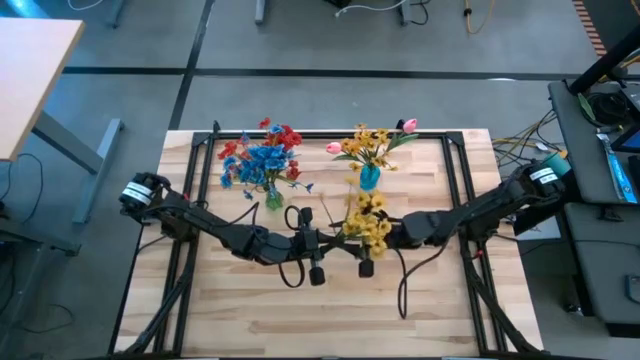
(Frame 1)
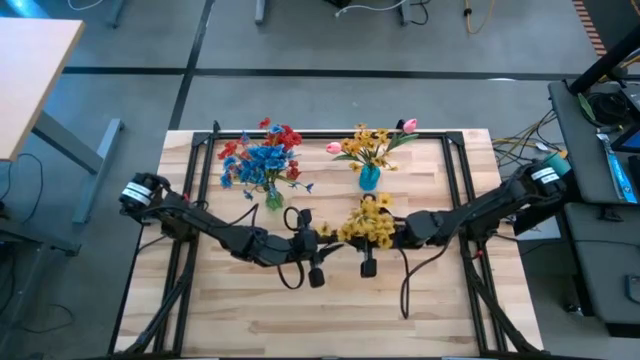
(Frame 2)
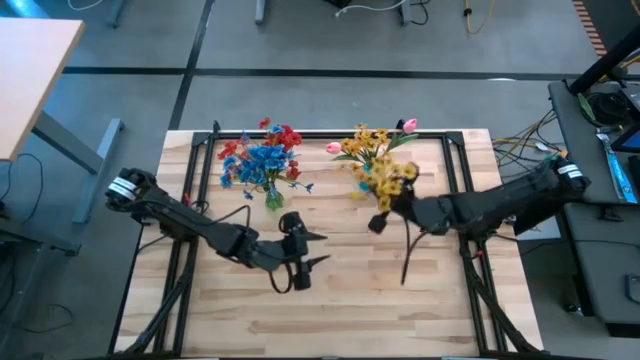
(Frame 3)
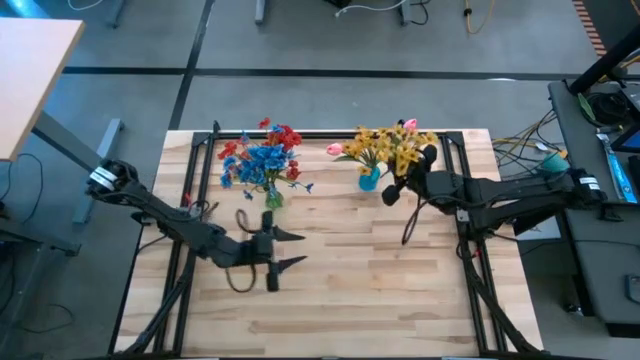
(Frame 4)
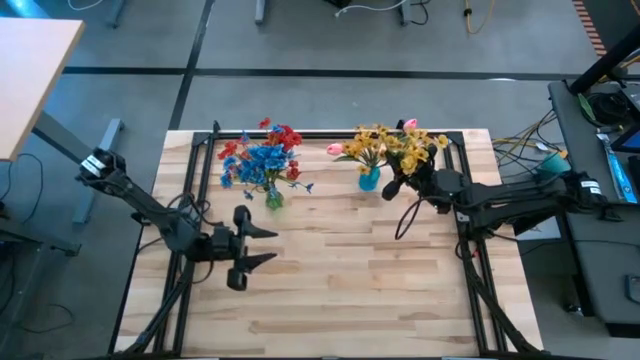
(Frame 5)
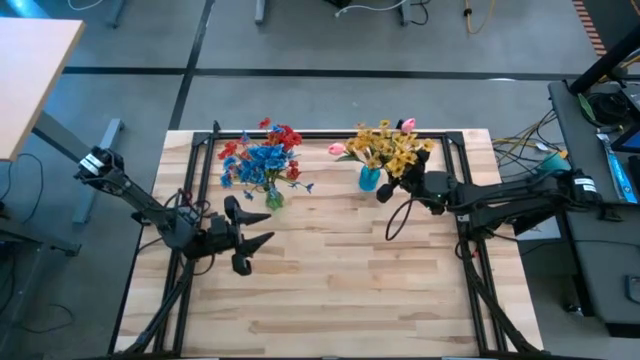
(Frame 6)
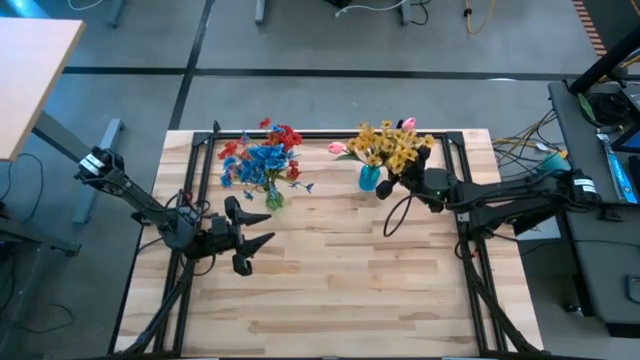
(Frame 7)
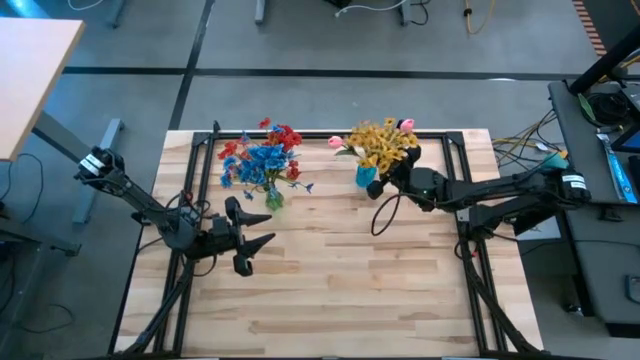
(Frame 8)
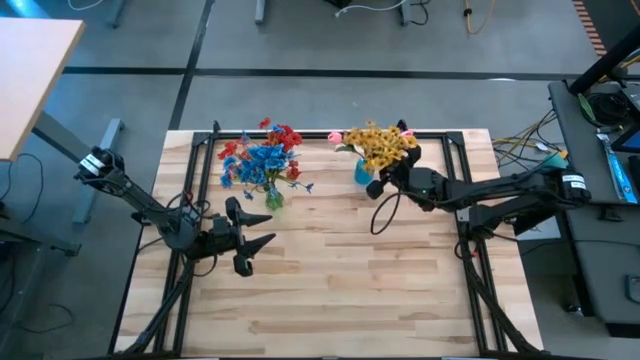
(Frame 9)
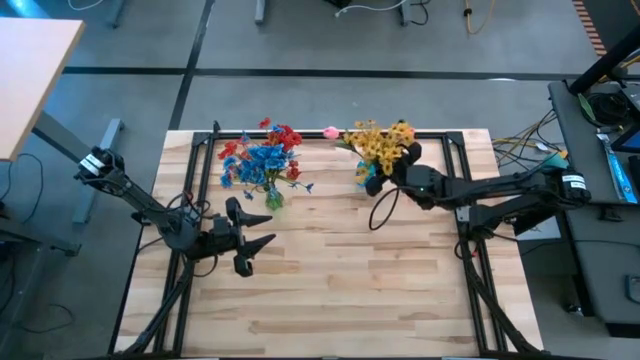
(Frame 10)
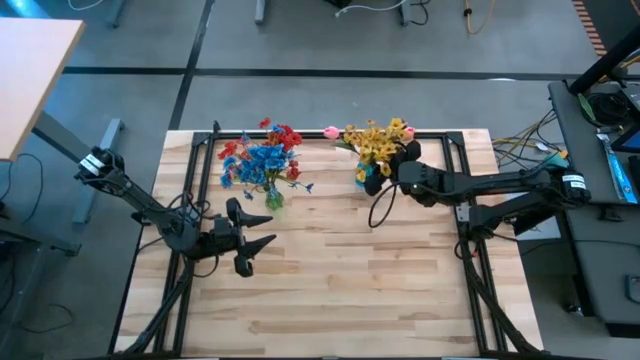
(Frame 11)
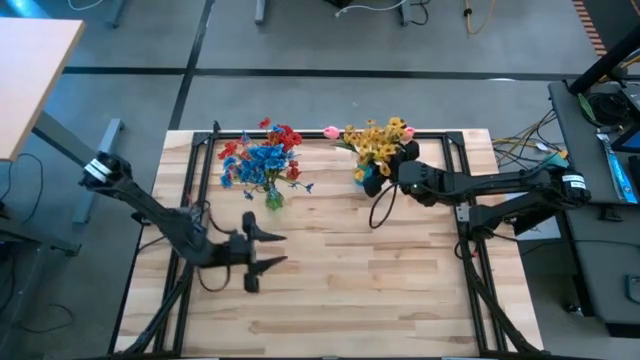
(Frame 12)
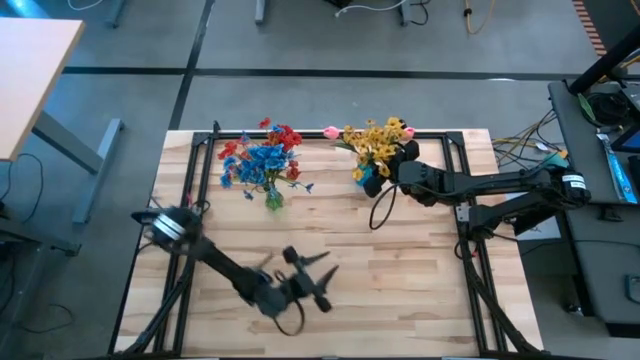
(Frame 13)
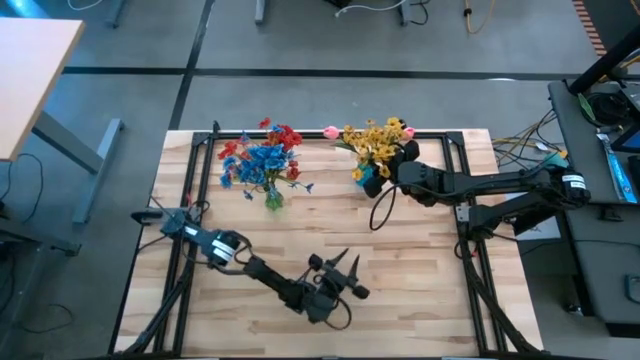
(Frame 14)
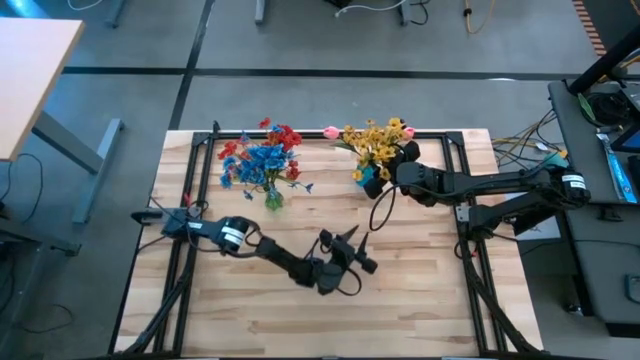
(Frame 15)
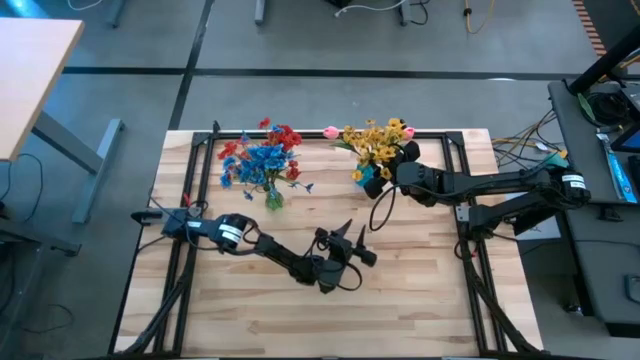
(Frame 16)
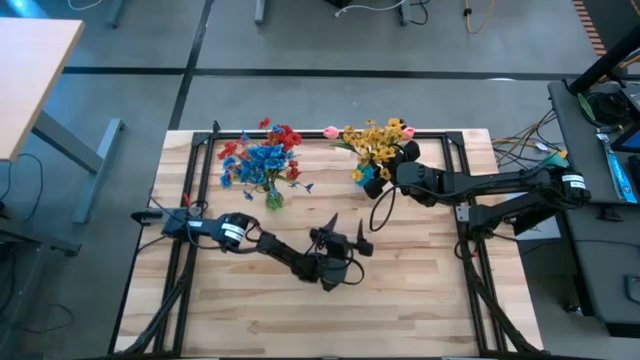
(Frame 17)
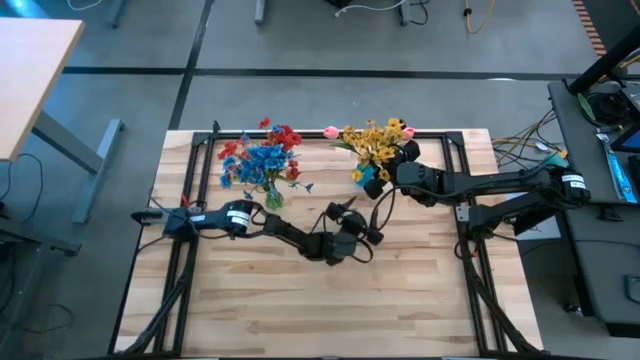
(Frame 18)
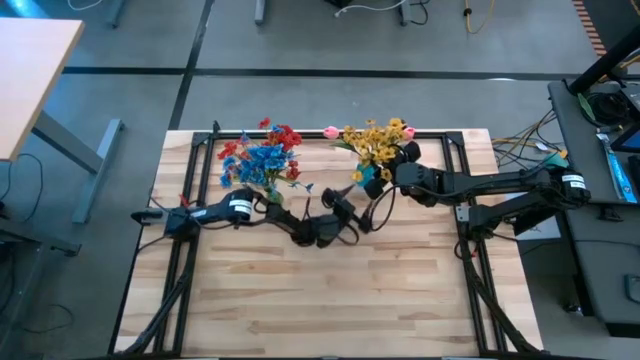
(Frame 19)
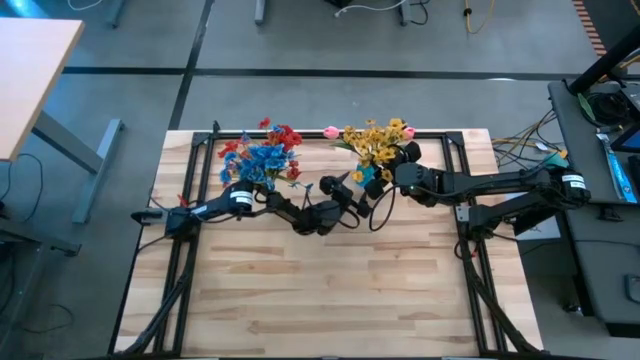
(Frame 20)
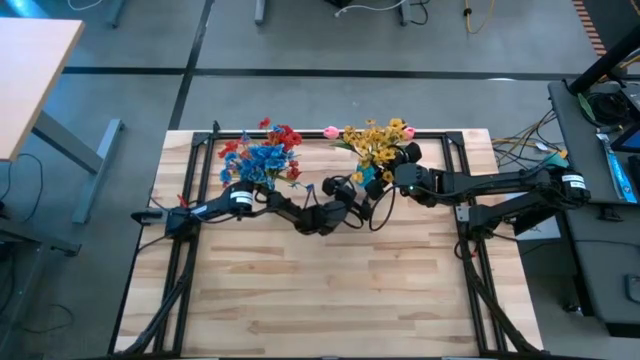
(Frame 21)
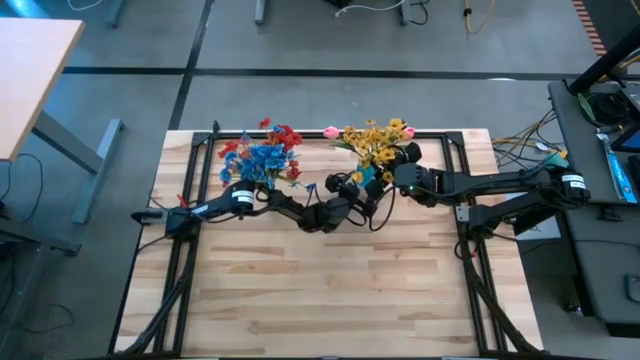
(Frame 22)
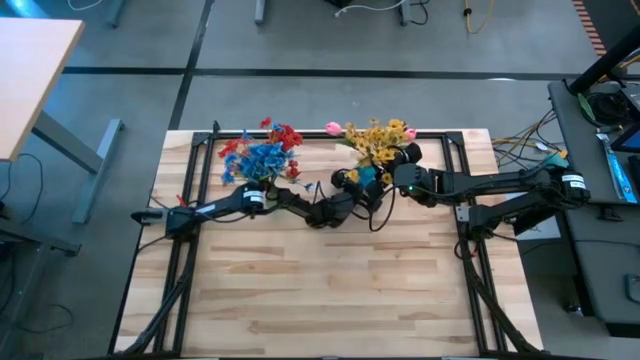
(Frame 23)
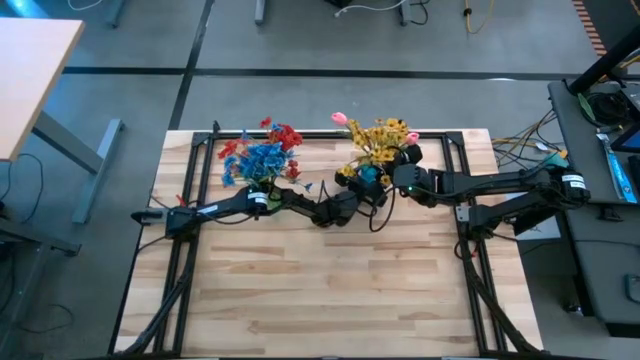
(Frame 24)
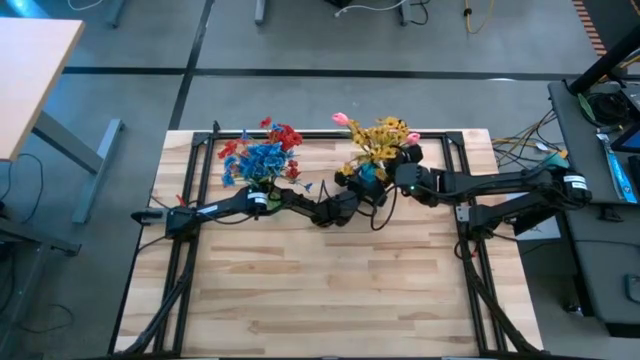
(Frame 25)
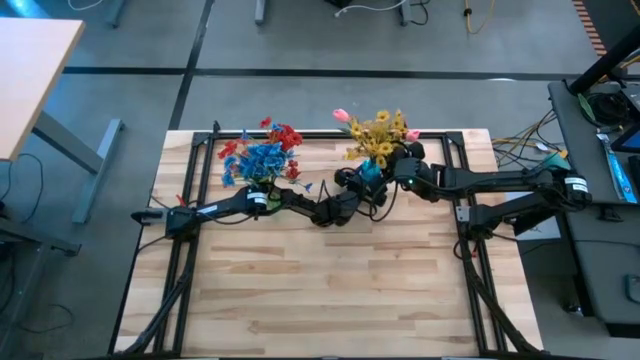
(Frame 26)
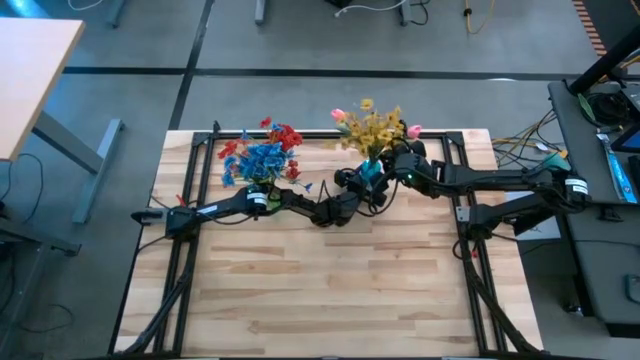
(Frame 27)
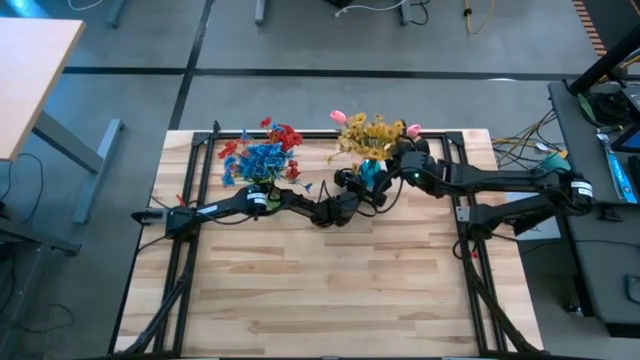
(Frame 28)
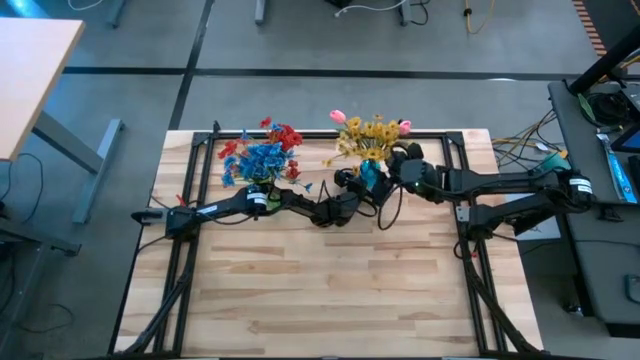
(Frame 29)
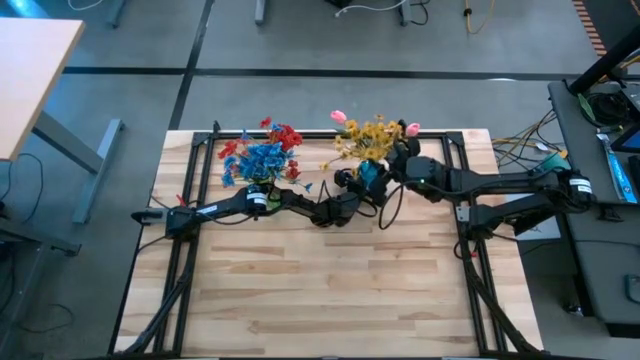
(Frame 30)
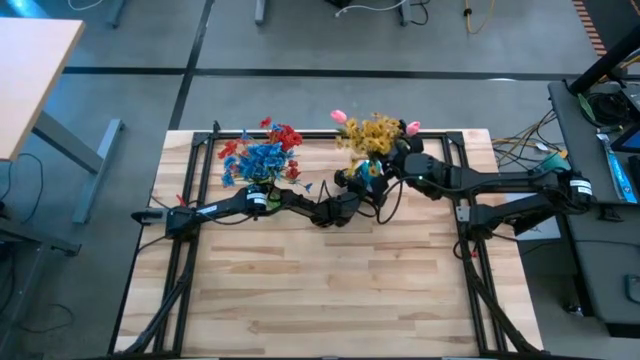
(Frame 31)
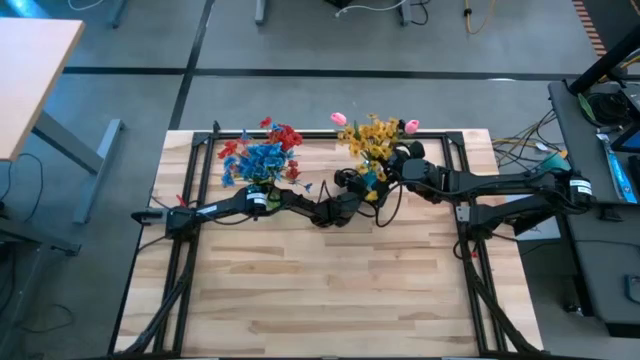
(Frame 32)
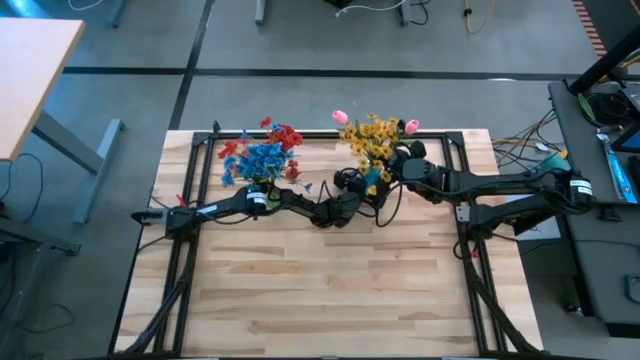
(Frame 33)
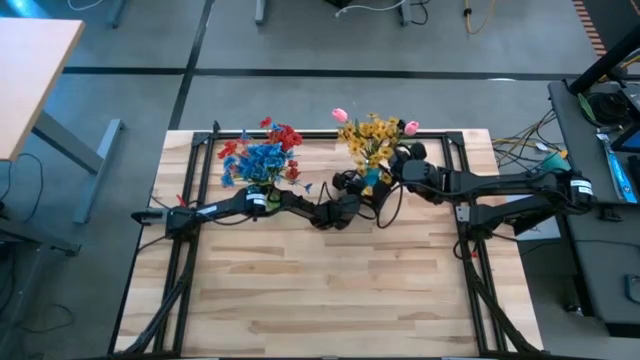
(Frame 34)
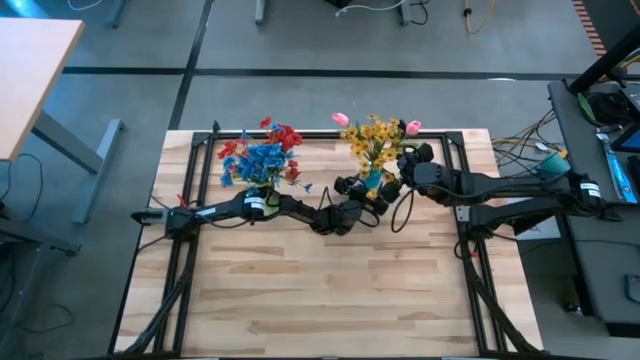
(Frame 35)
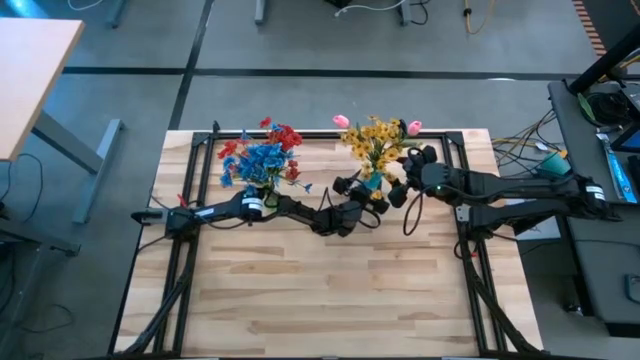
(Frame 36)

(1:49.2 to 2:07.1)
Task: Sort flowers into vase by color
Put the yellow flowers into the blue vase

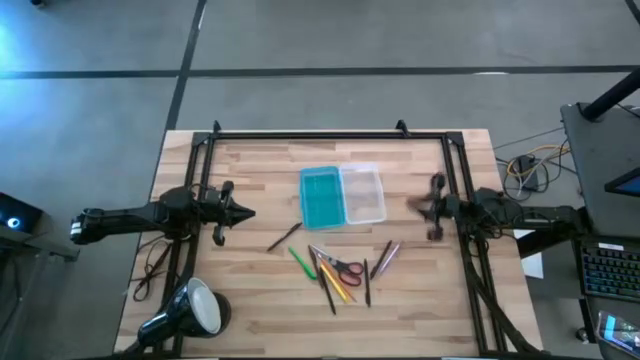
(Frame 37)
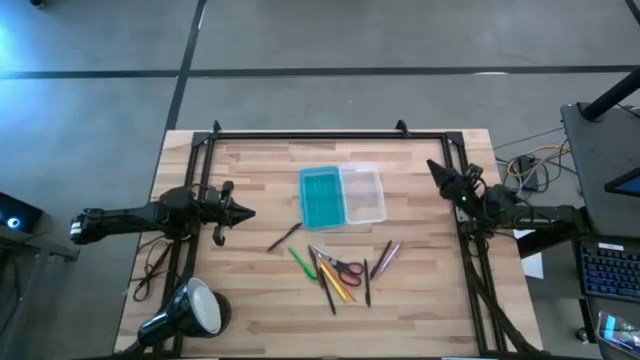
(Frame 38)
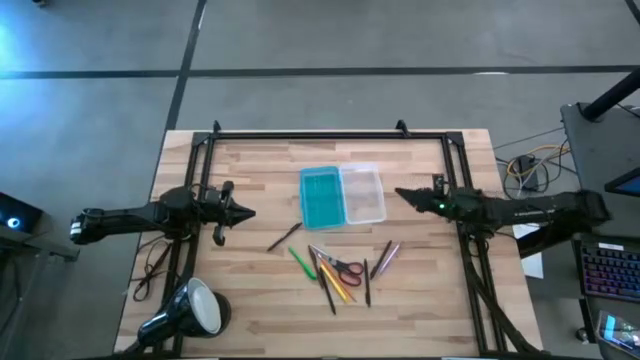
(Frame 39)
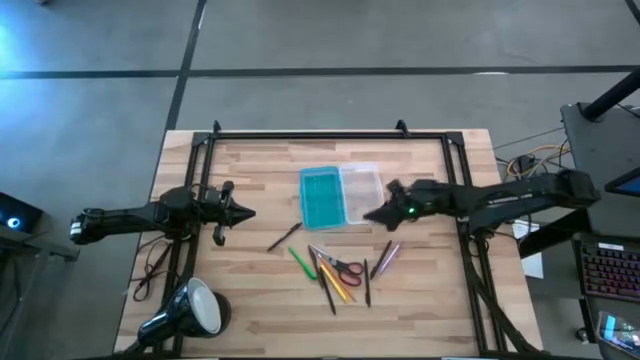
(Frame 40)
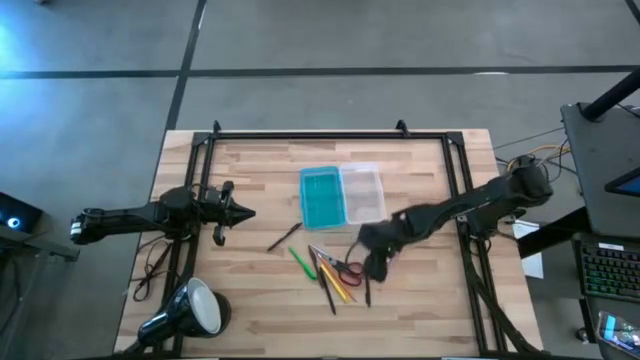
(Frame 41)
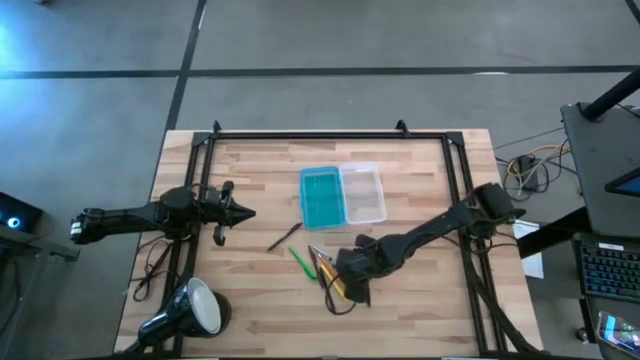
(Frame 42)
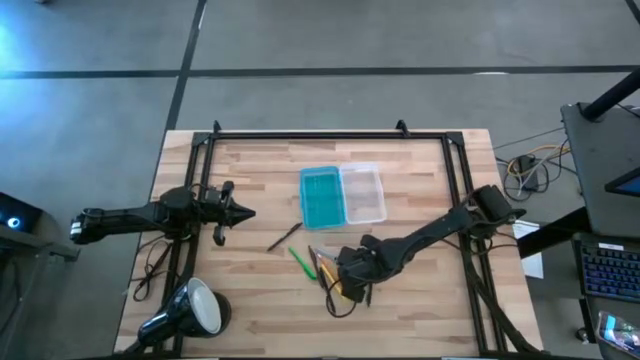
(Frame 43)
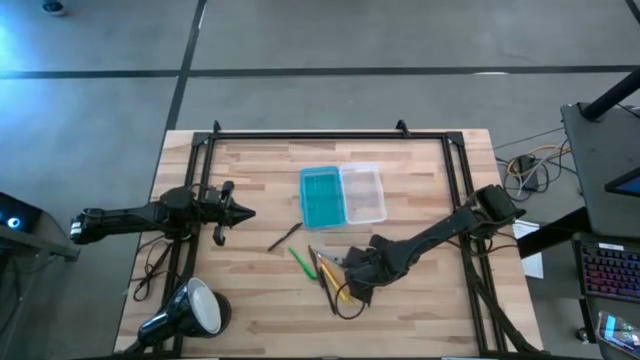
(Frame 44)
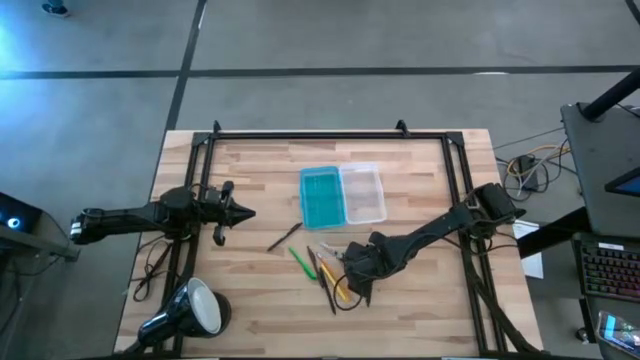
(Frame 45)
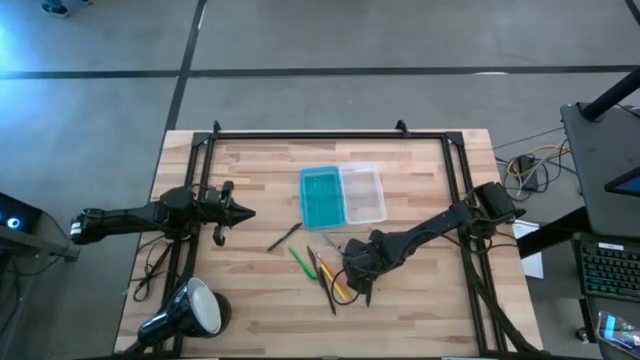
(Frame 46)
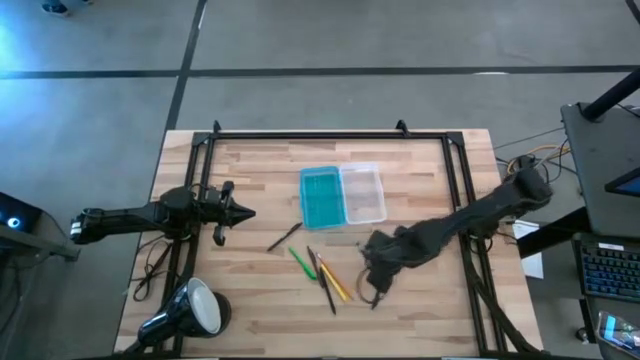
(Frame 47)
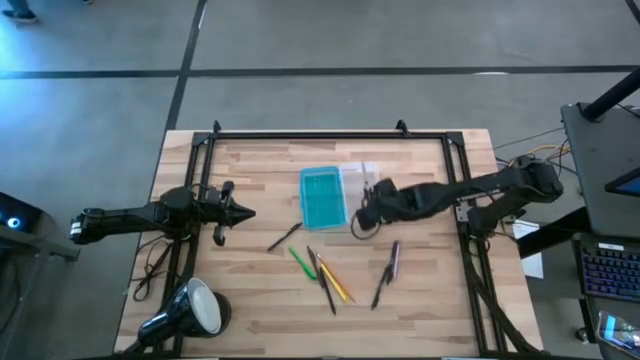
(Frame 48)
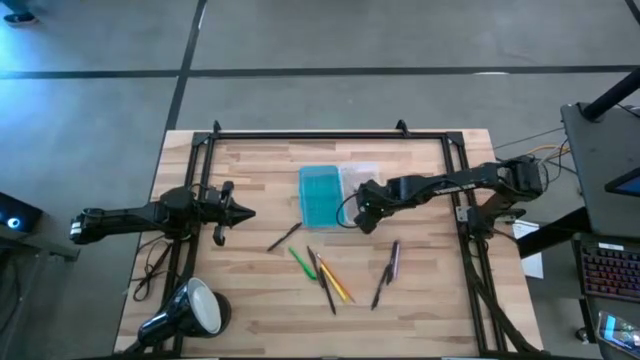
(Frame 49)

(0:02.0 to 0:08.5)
Task: Pick & place school supplies into a supply box
Put the black scissors into the blue supply box
